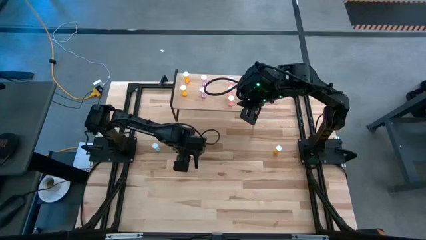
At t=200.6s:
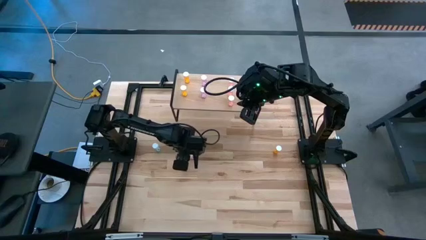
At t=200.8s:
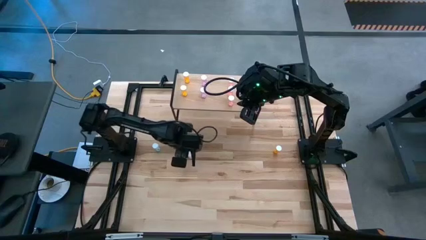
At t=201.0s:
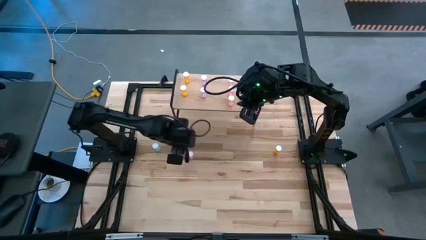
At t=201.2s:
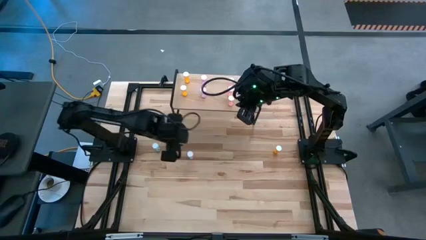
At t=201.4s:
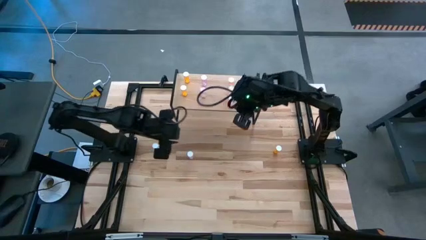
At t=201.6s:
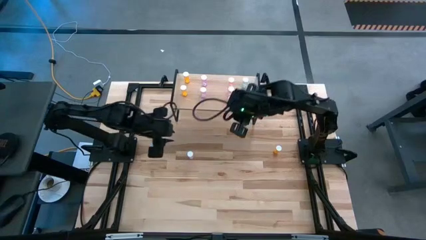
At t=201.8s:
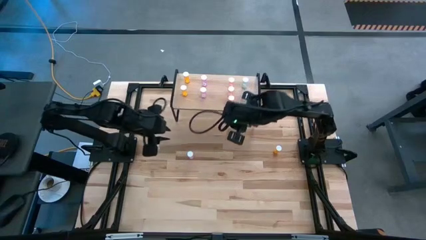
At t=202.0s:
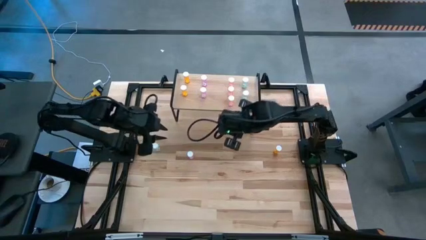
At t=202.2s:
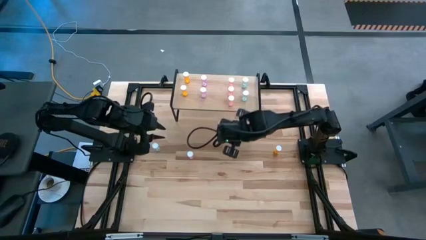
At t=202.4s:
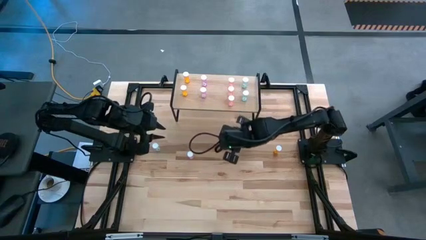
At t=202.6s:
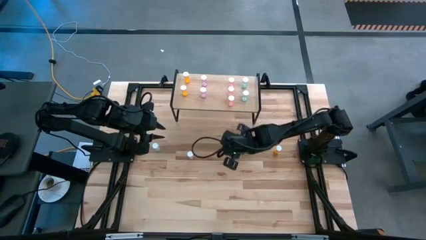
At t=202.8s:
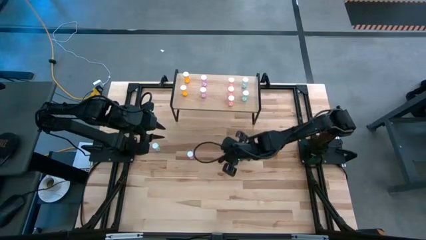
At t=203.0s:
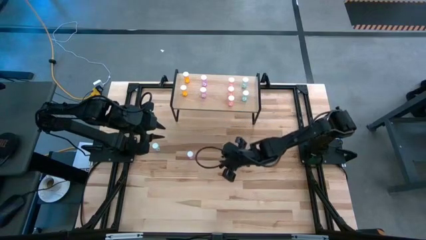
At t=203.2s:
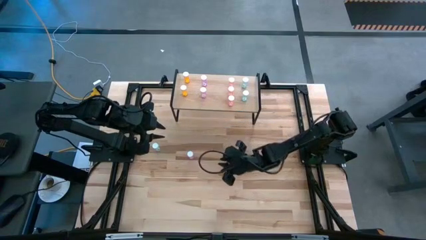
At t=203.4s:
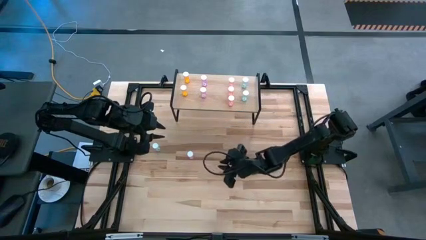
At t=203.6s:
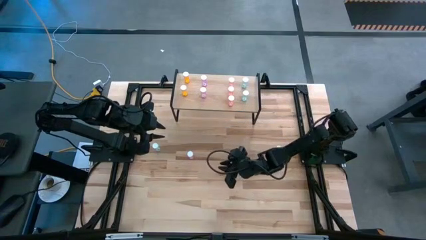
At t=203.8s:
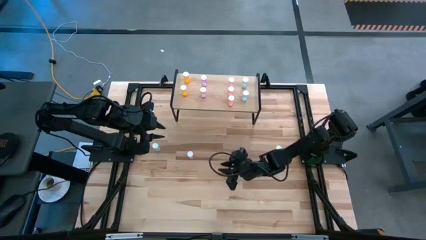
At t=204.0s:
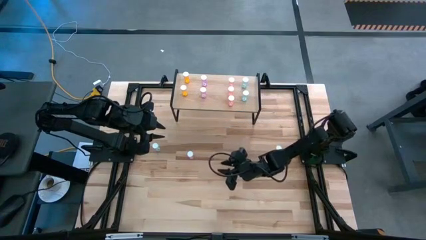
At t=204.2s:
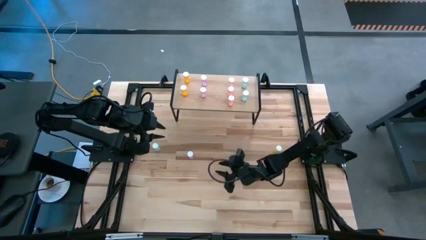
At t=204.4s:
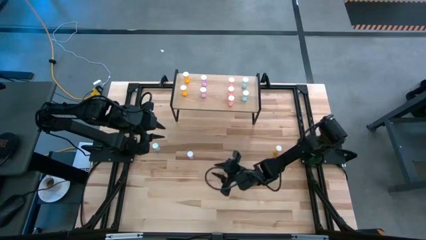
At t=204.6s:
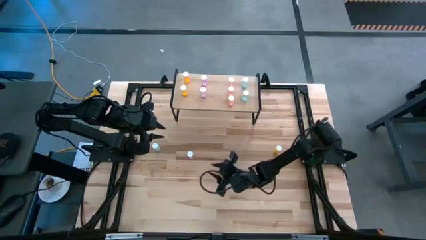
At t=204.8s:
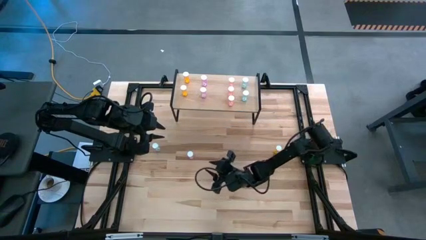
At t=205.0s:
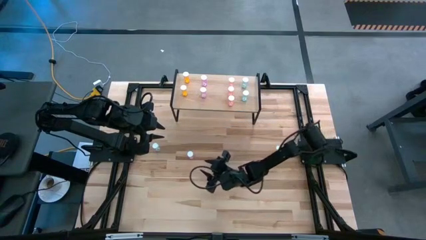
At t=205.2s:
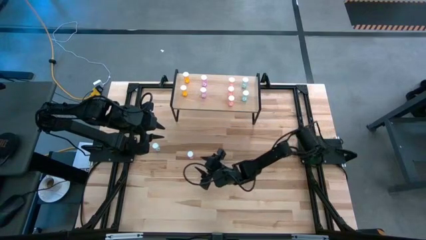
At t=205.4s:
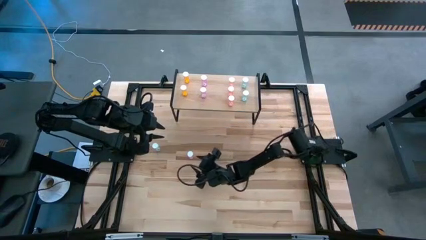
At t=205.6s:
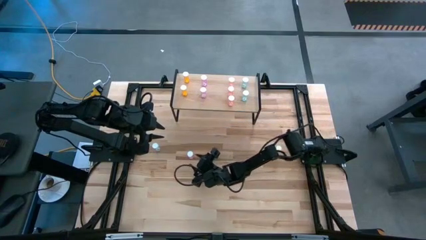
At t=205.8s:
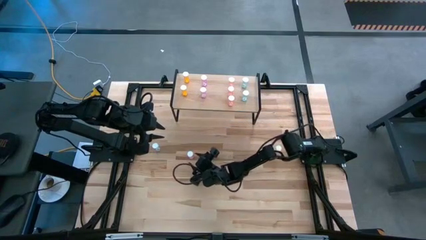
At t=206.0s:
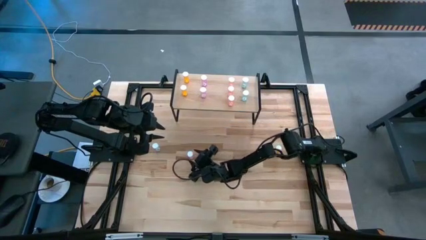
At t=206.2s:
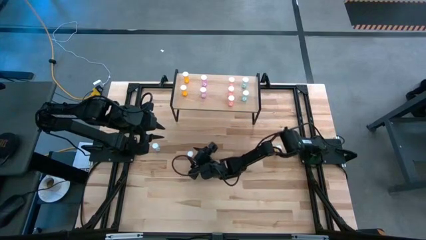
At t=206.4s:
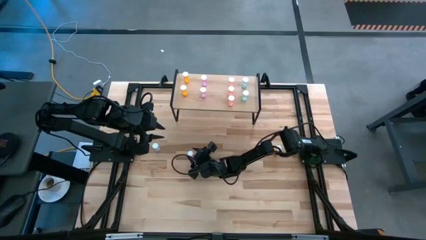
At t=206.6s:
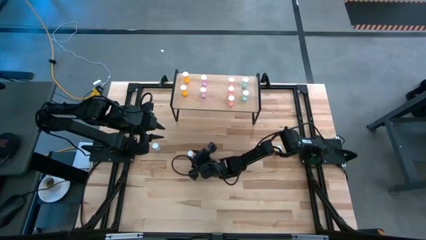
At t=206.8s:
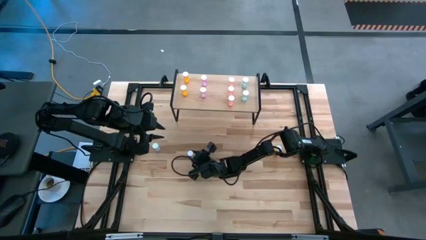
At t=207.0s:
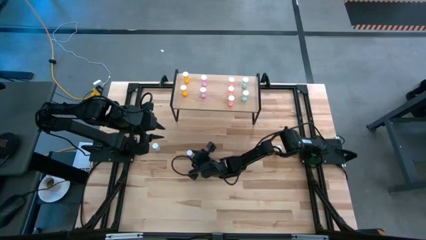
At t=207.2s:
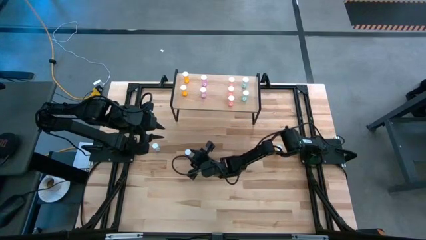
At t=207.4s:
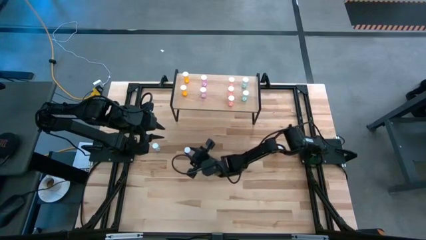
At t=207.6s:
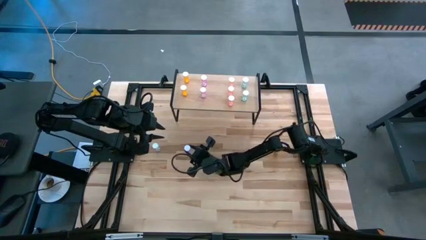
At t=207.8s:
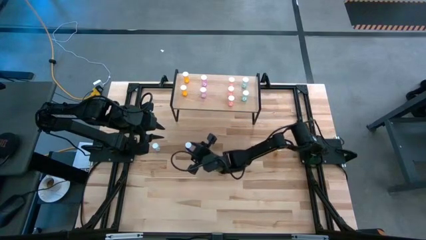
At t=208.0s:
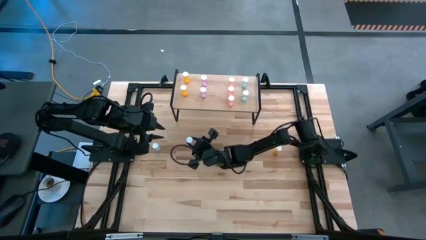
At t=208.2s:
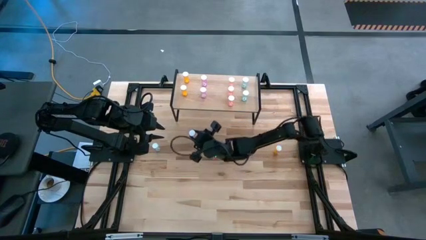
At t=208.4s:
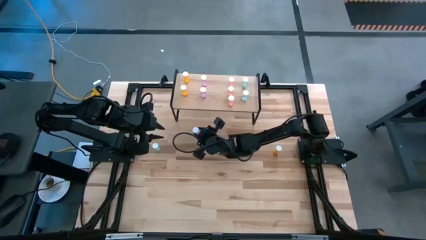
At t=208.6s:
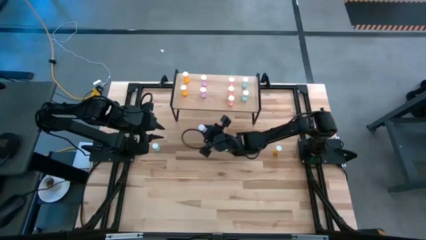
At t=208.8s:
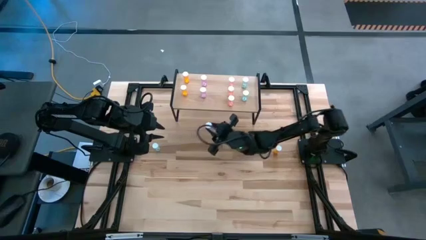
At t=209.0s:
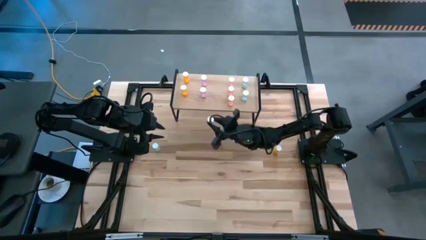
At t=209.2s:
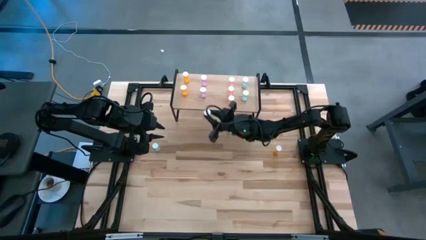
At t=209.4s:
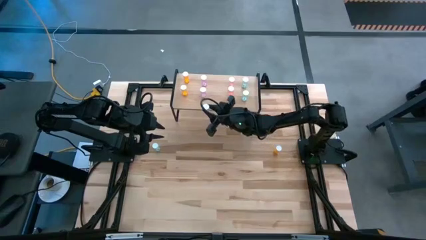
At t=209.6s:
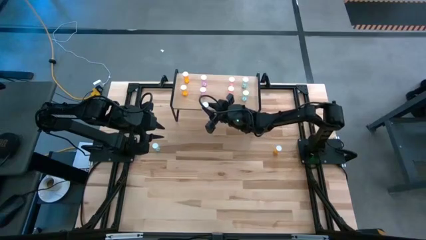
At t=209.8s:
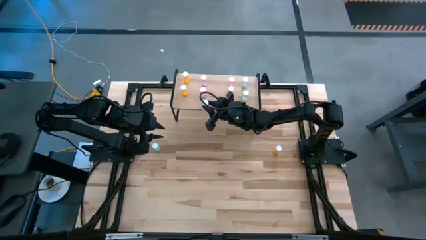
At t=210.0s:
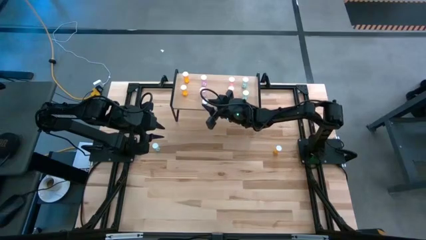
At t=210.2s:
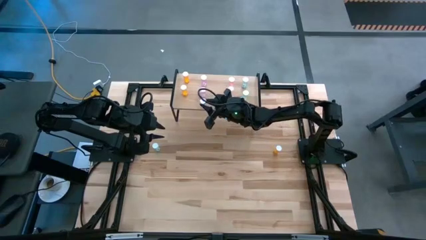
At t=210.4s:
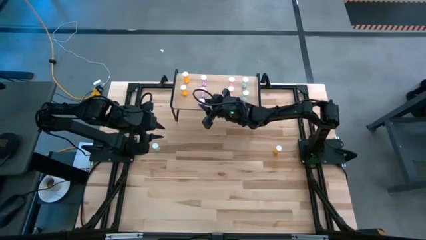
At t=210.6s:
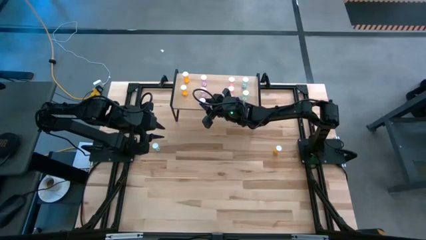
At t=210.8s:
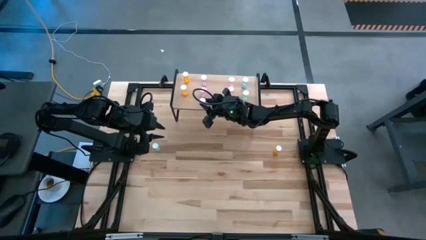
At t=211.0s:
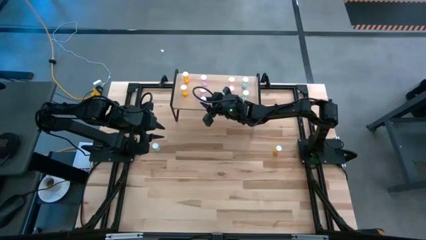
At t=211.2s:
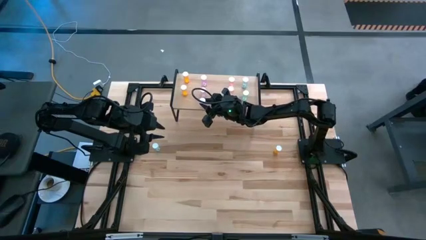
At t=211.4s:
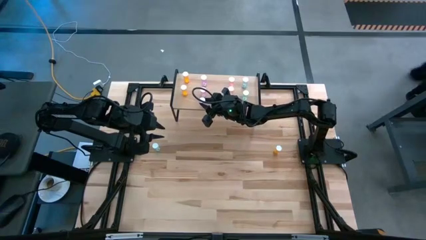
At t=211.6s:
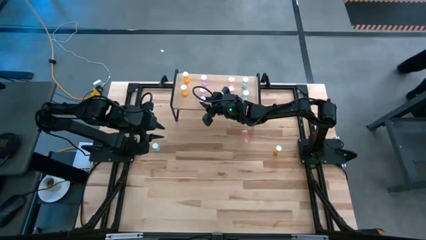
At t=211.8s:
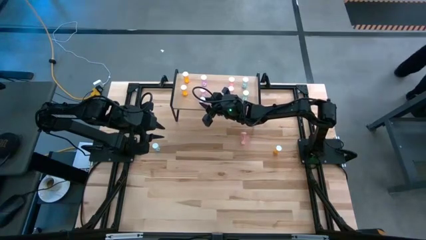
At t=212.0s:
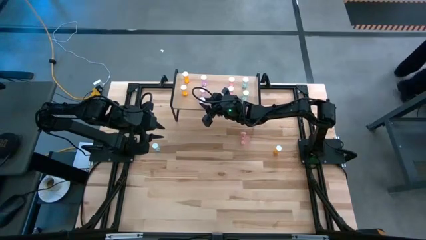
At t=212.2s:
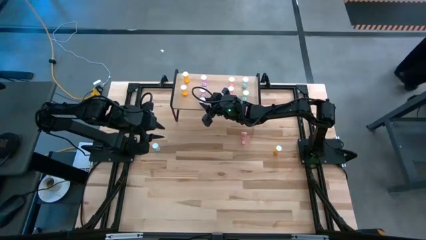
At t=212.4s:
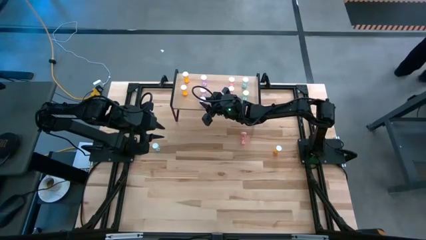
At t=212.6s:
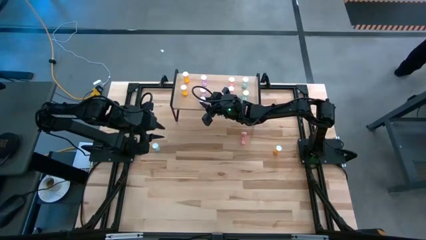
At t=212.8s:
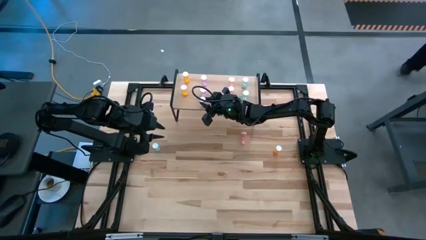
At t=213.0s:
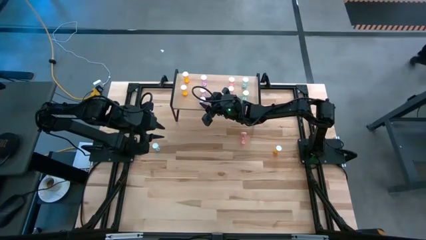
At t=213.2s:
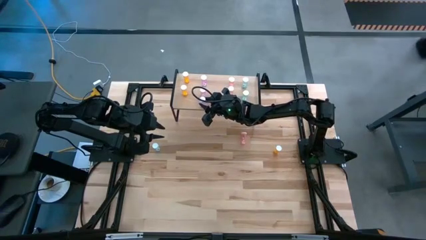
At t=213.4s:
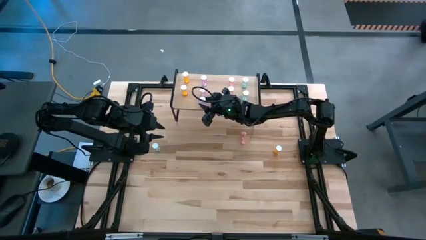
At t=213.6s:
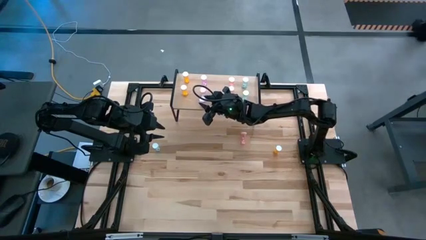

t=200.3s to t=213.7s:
Task: Pick and place medicine bottles onto shelf by color
Put the purple pill bottle on the shelf aligned with the other purple pill bottles
